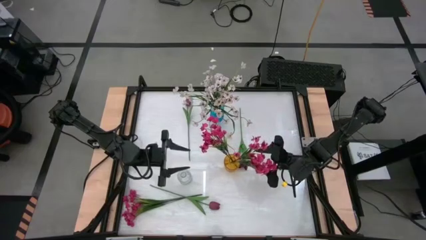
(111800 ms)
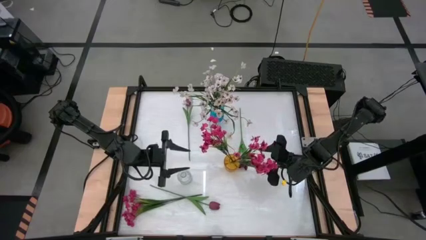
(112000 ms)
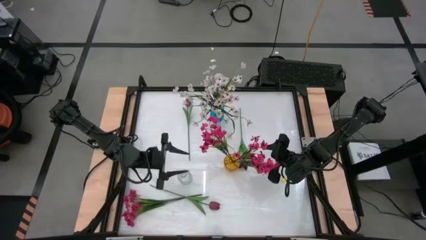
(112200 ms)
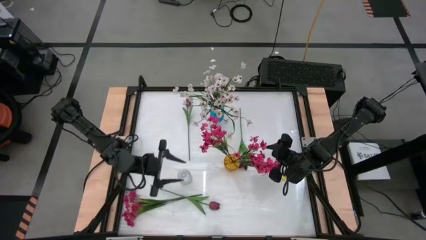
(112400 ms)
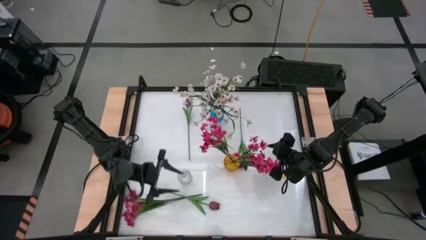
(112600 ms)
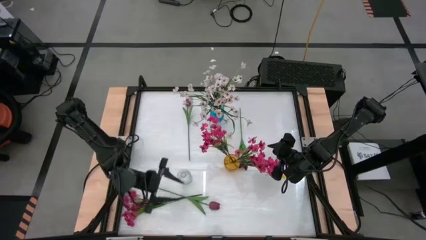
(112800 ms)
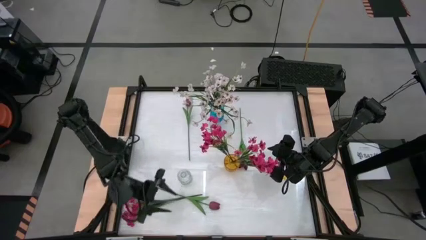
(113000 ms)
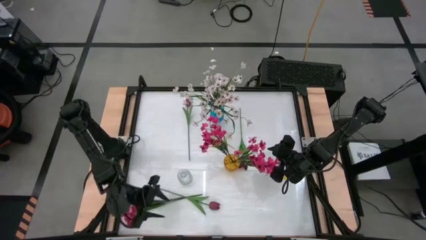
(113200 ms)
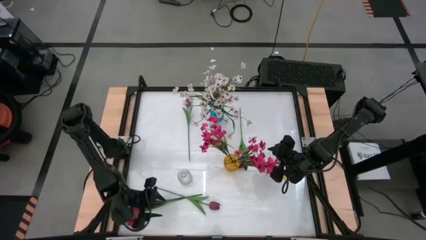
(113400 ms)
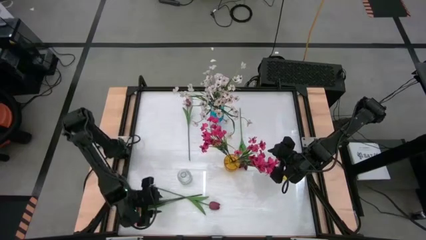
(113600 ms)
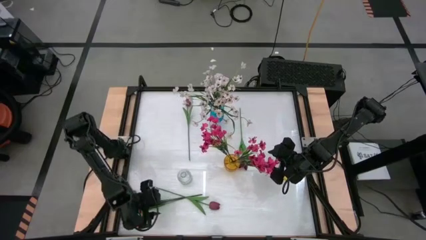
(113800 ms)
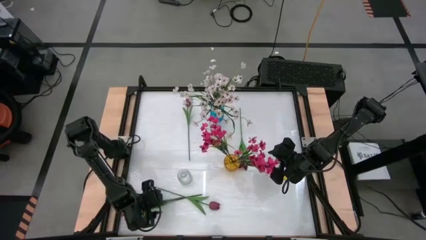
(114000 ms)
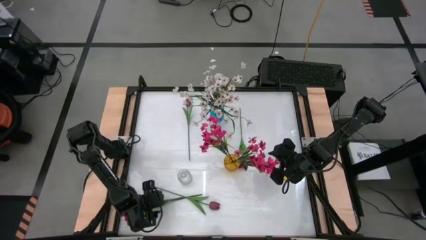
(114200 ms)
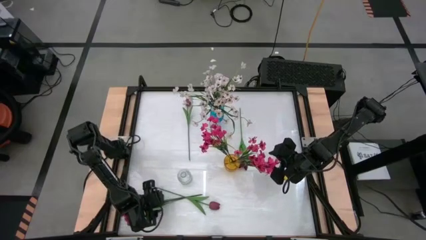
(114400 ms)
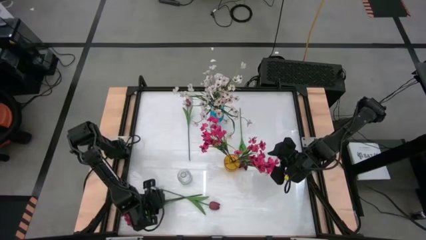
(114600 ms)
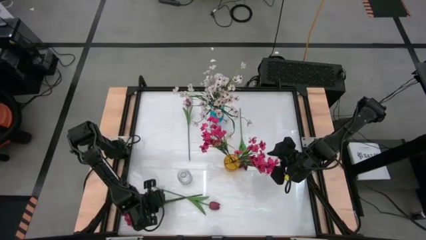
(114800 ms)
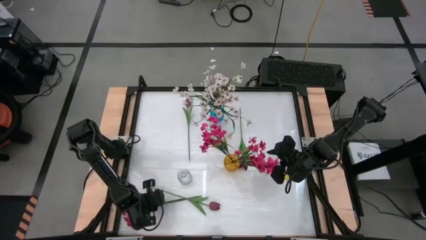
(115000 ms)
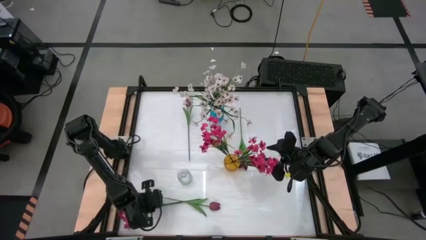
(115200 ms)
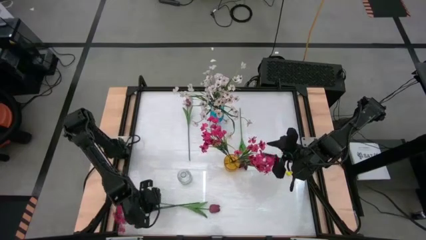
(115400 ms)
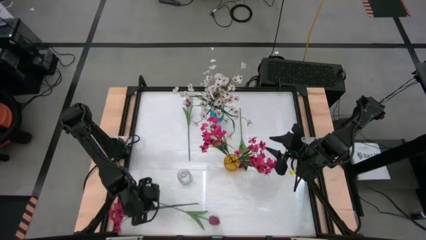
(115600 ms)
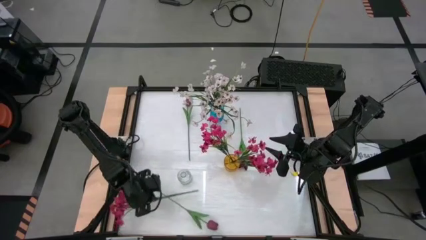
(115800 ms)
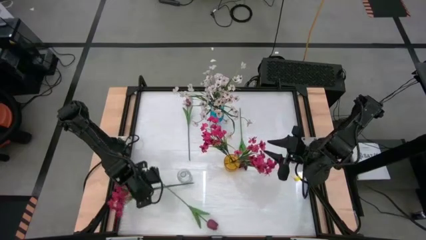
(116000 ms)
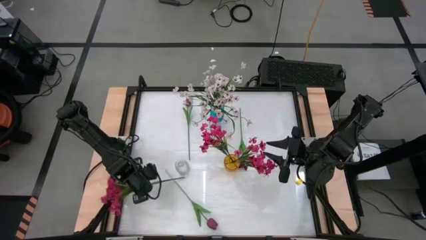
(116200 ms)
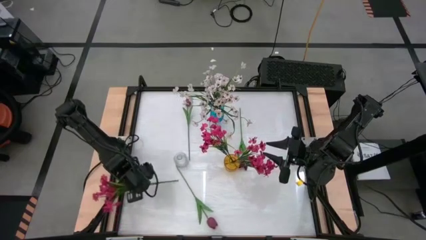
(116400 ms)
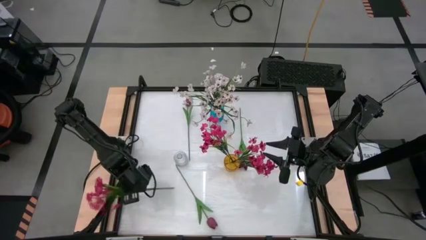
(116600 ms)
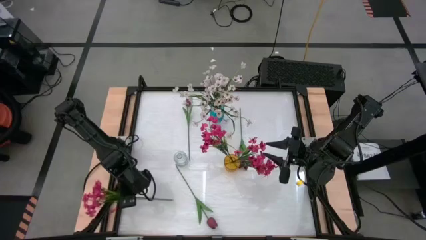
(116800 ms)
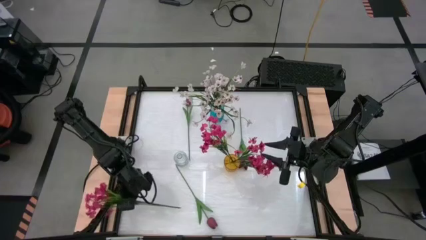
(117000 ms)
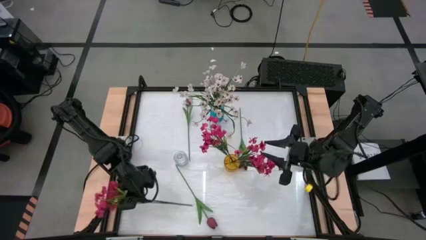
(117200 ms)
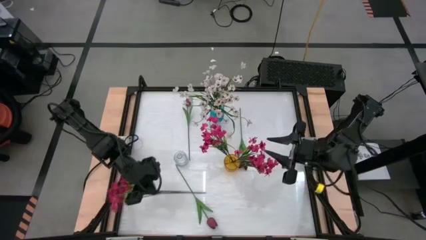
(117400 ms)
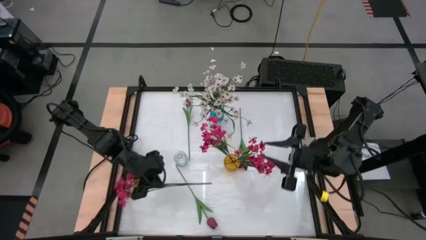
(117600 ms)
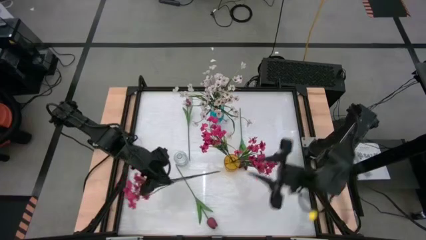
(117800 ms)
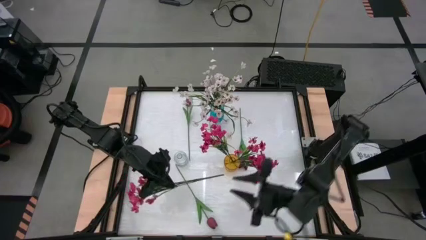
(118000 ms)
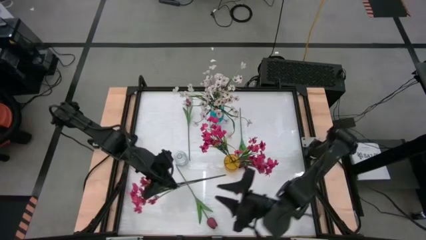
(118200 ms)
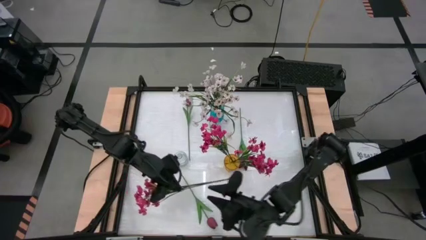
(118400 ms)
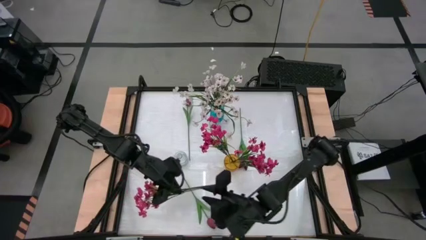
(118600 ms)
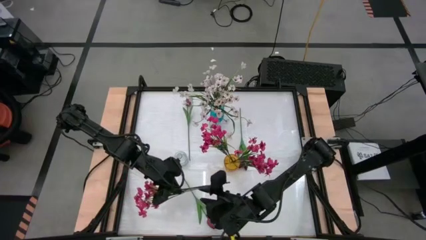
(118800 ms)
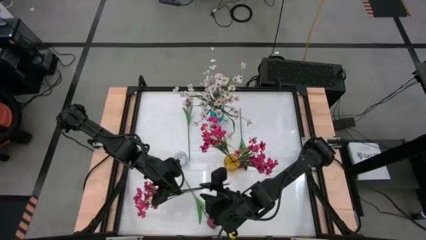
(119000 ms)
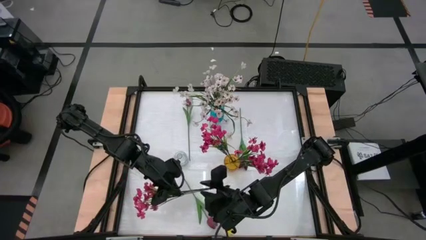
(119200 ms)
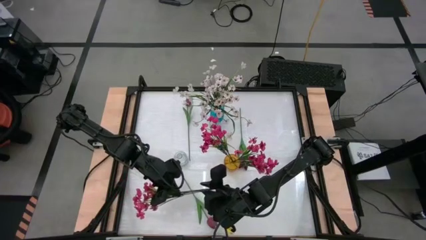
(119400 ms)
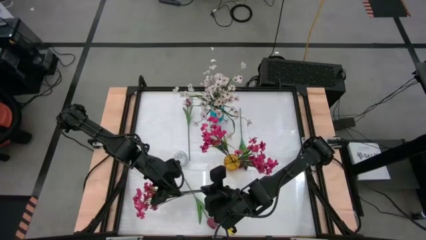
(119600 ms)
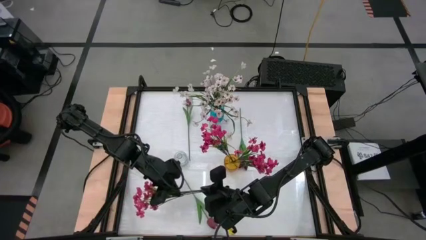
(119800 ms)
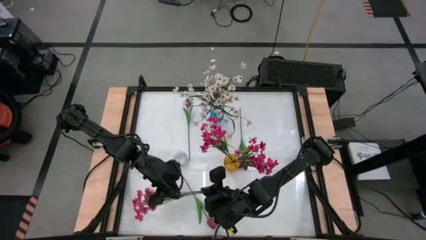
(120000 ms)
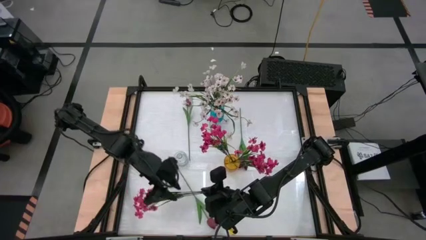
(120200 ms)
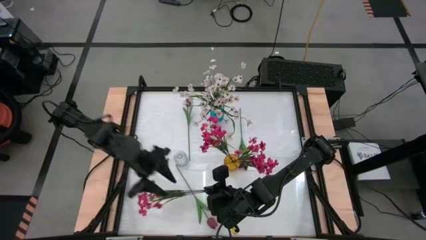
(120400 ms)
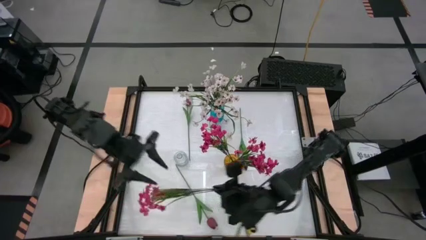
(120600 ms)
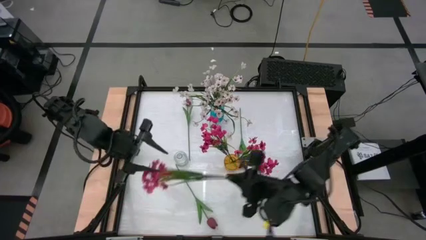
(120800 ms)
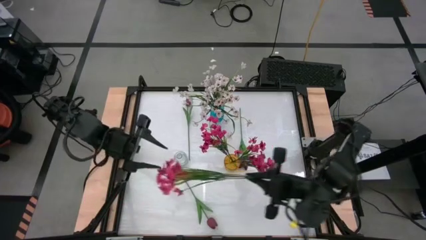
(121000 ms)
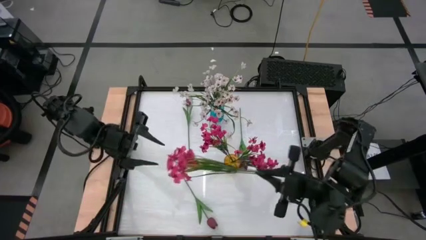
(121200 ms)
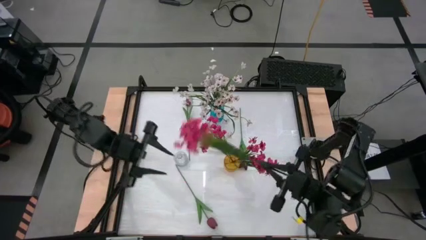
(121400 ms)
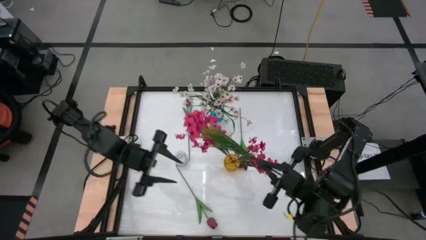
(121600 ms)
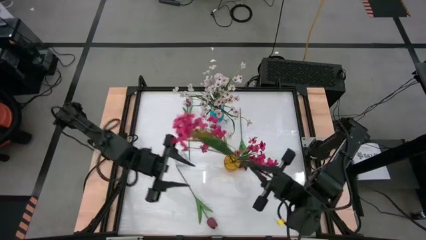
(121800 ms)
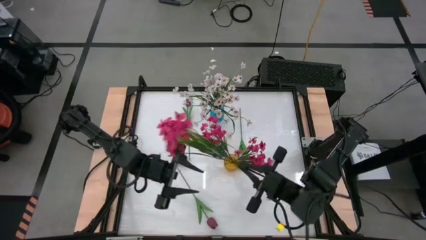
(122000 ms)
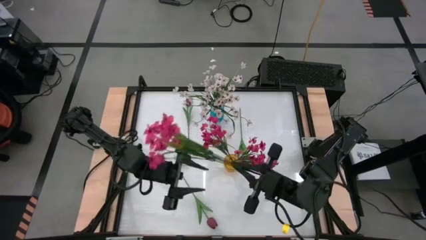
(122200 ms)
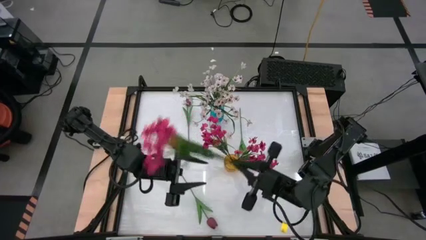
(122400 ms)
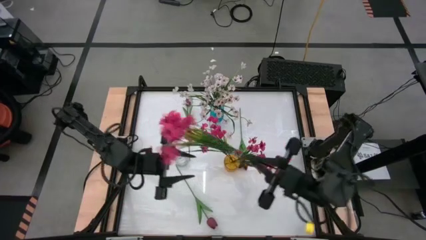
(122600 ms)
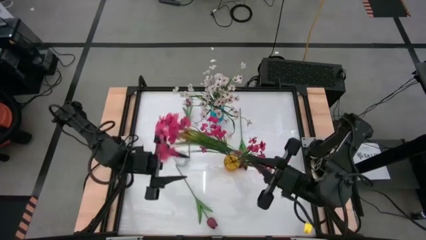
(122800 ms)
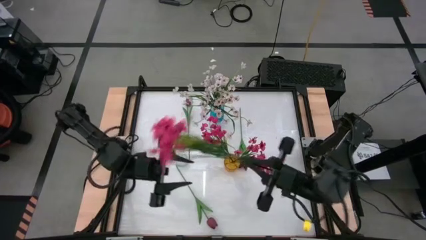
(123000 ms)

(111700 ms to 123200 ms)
Task: Sort flowers into vase by color
Put the pink flowers into the yellow vase

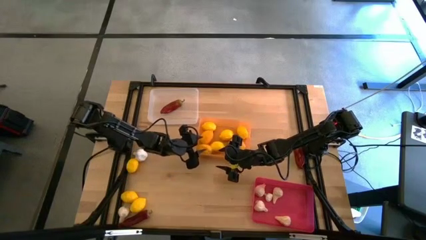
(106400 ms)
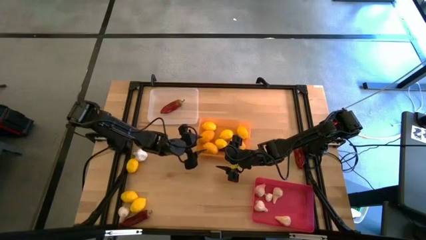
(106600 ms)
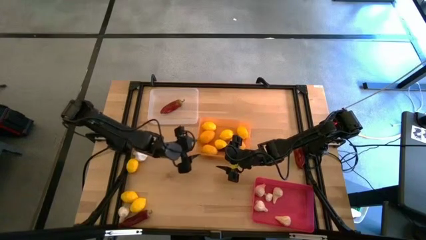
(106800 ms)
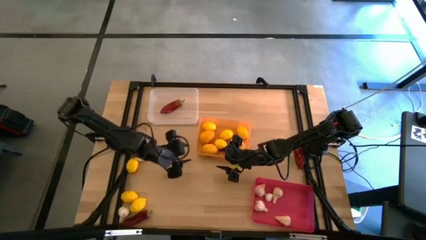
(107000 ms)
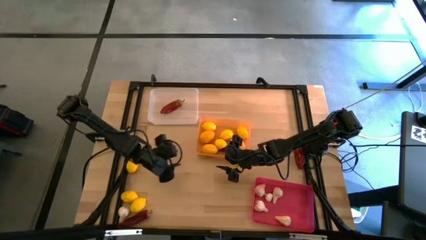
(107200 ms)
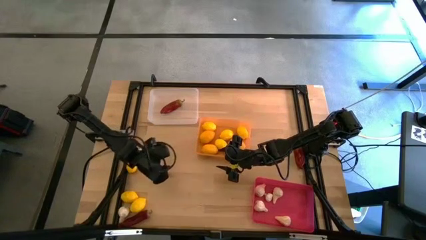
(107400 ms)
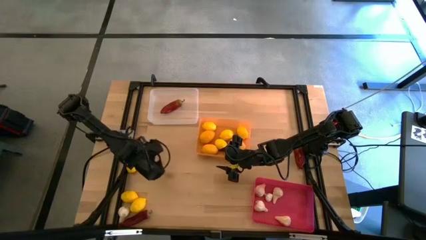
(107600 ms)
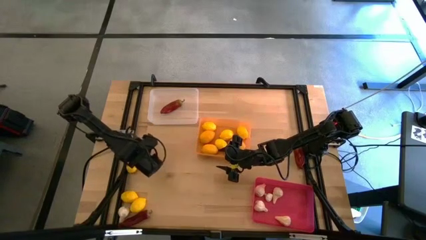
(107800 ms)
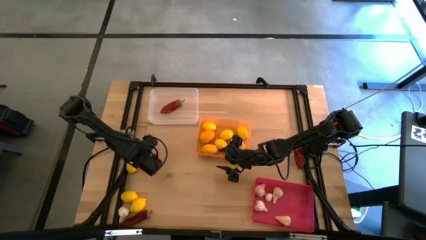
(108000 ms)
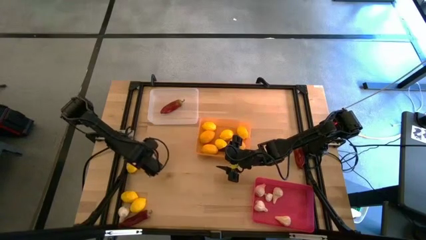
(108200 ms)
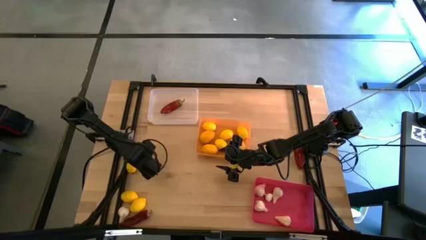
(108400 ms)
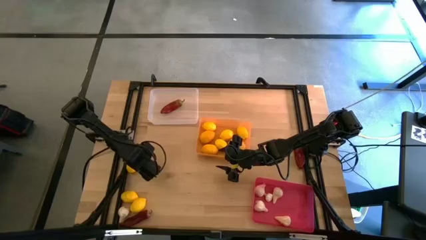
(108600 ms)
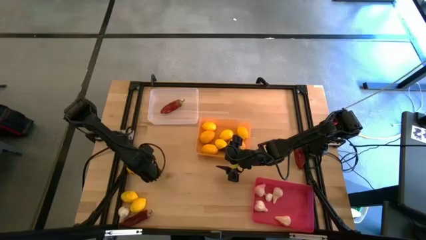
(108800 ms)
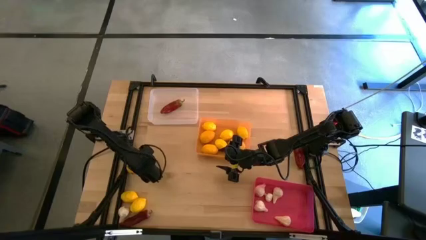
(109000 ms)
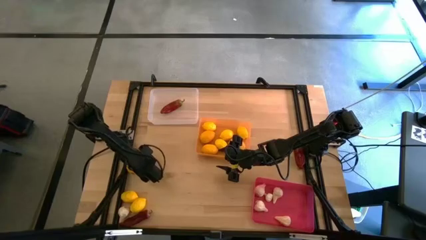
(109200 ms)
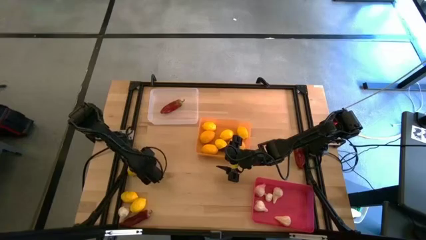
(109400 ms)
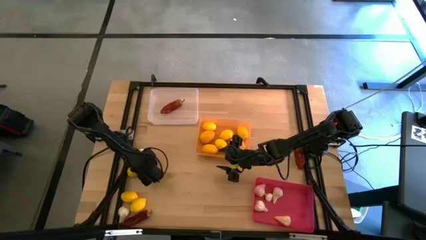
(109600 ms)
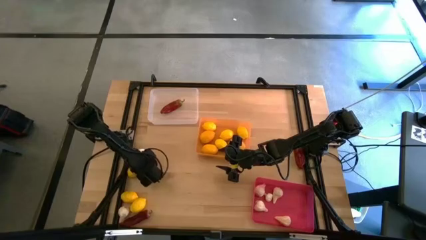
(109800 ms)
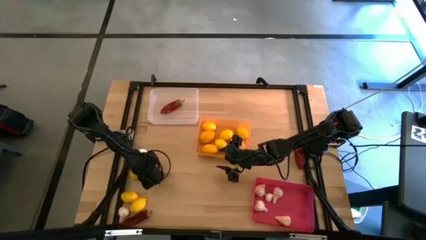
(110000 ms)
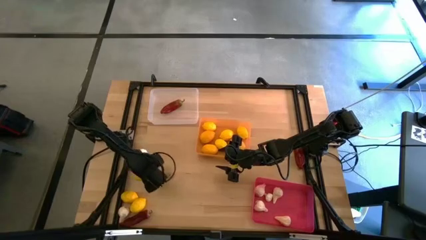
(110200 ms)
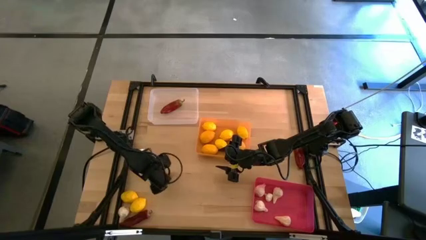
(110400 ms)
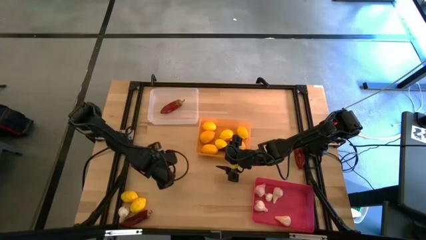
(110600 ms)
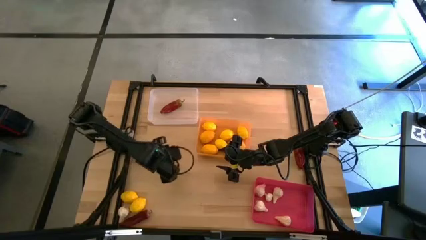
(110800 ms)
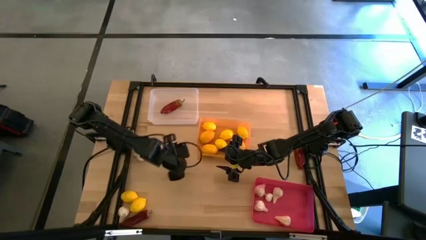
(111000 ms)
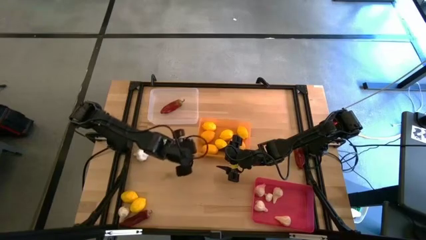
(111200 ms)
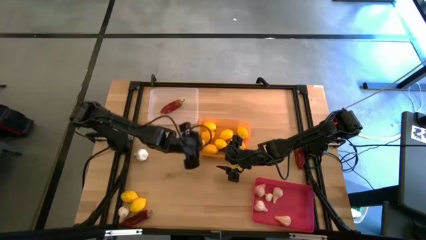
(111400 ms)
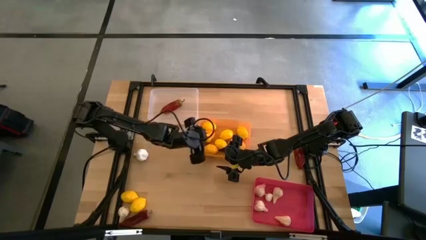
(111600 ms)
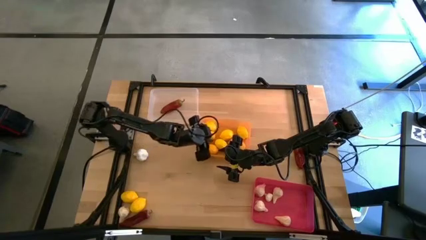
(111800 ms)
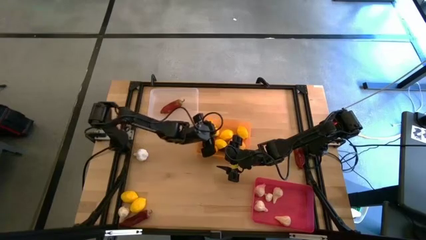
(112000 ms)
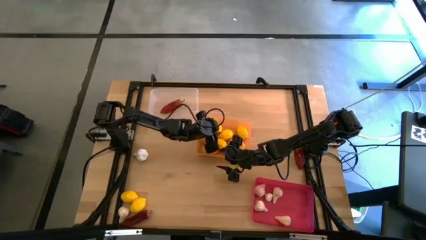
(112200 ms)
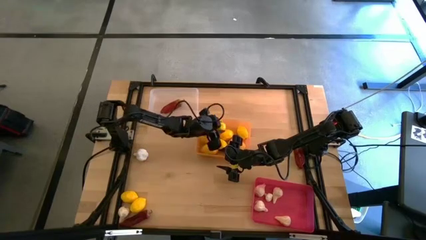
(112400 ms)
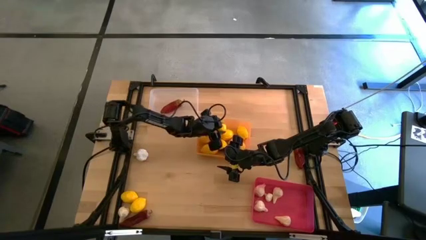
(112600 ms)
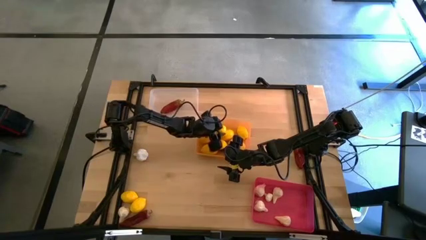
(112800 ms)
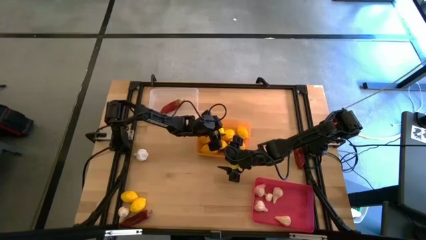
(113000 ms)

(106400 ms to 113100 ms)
Task: Sort produce into baskets
Put the lemon into the orange bin
